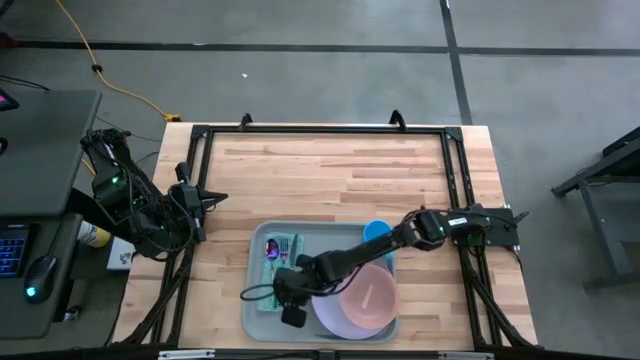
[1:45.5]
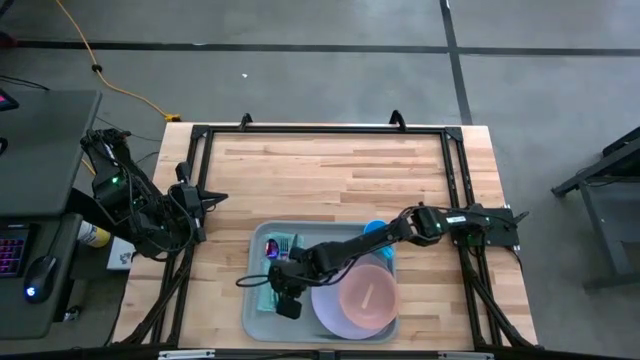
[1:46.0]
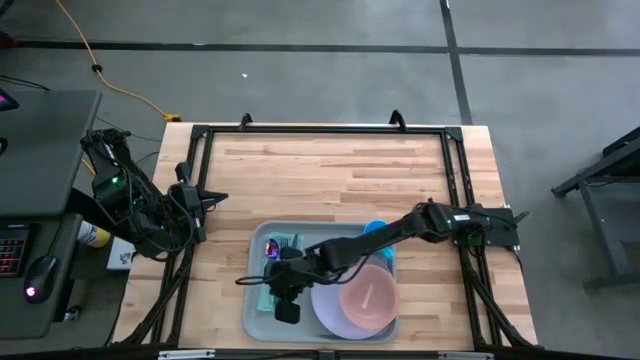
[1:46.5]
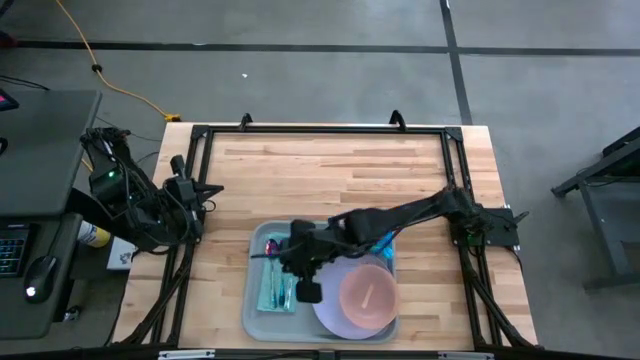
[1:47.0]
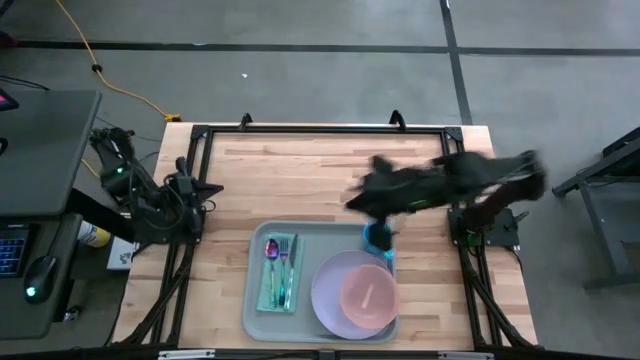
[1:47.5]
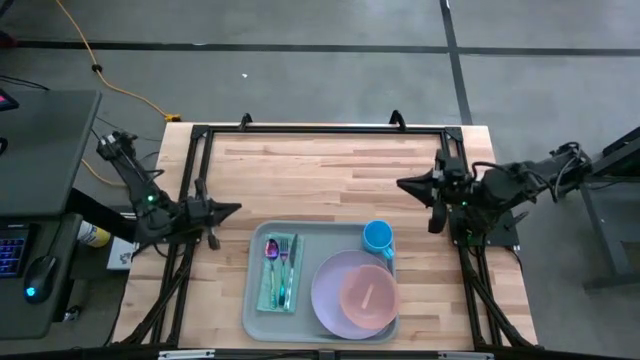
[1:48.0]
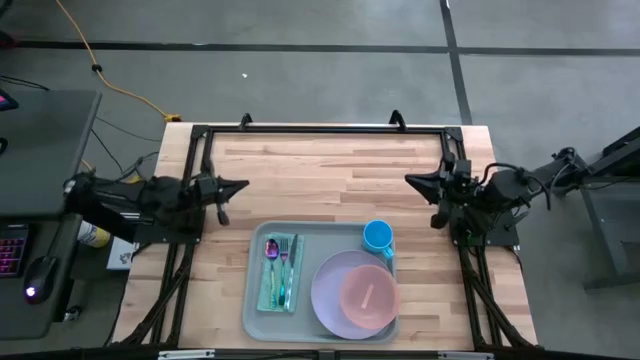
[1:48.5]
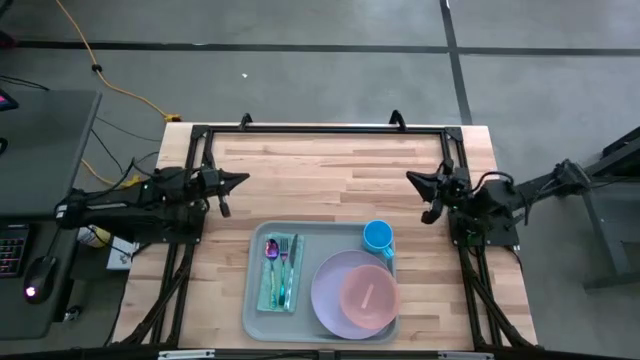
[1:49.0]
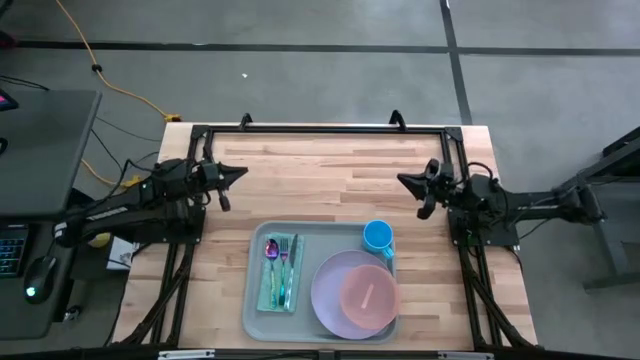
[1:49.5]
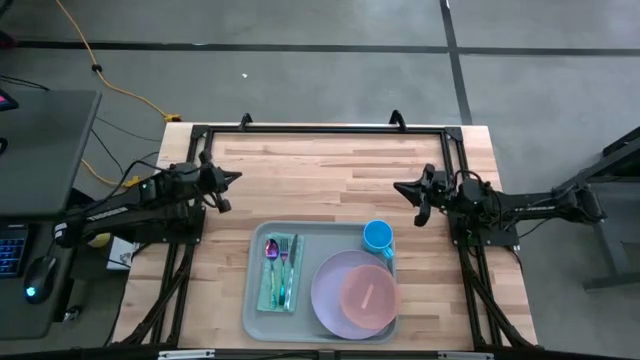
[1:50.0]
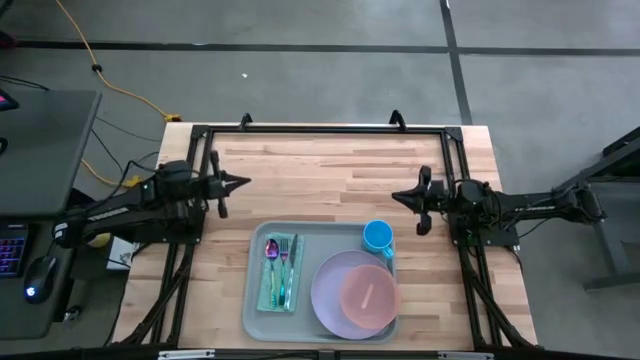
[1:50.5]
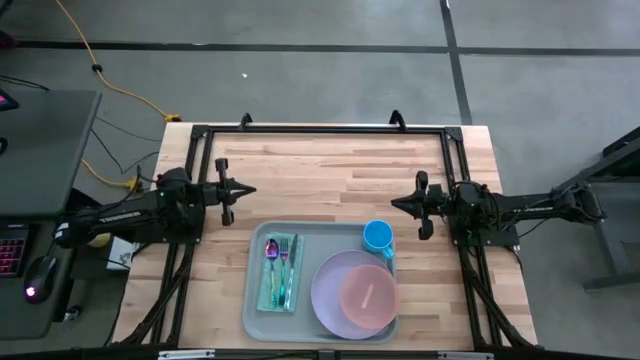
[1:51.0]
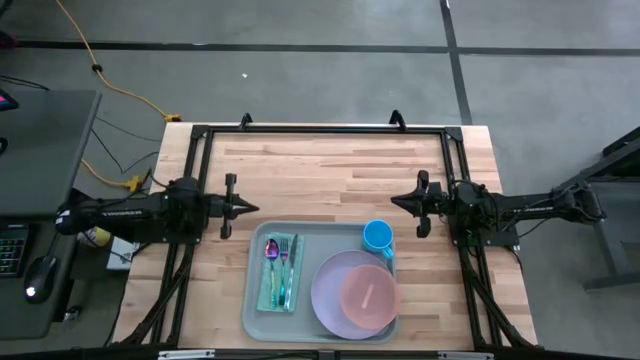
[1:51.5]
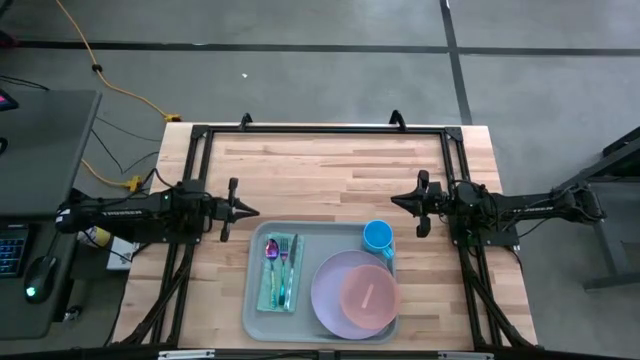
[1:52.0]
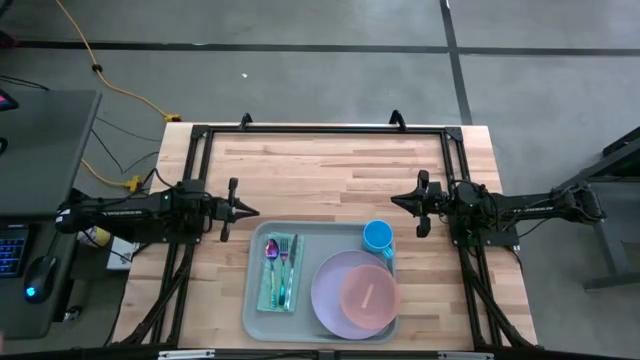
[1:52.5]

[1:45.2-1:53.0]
Task: Set up tray
Return to Home Position

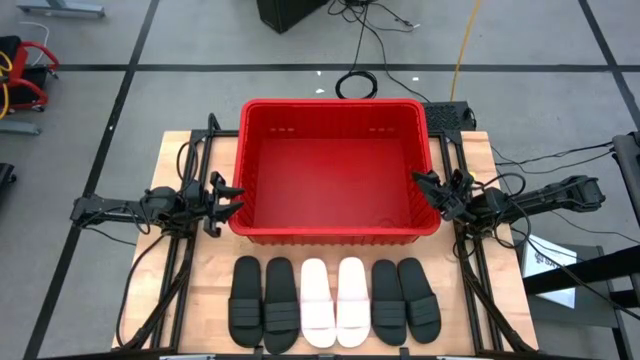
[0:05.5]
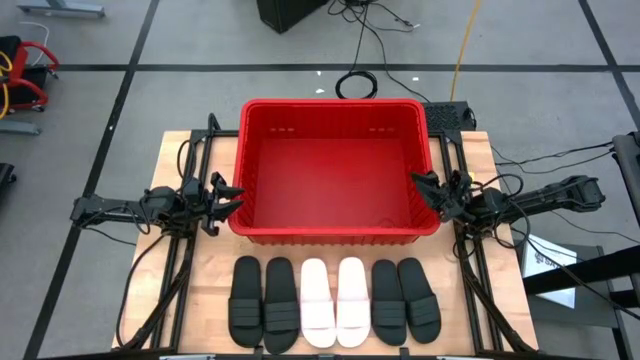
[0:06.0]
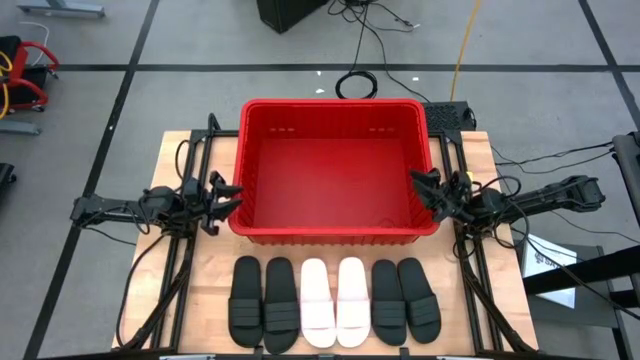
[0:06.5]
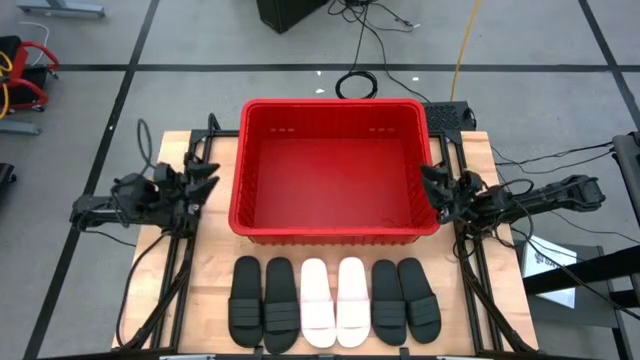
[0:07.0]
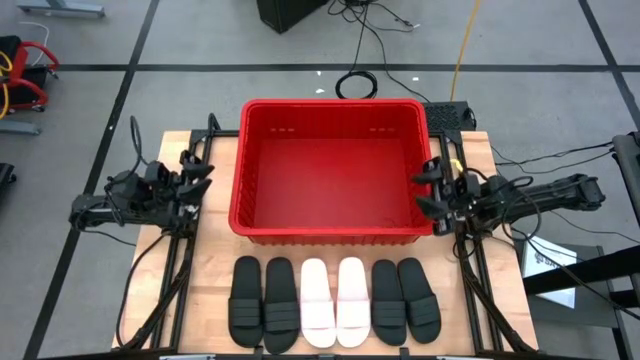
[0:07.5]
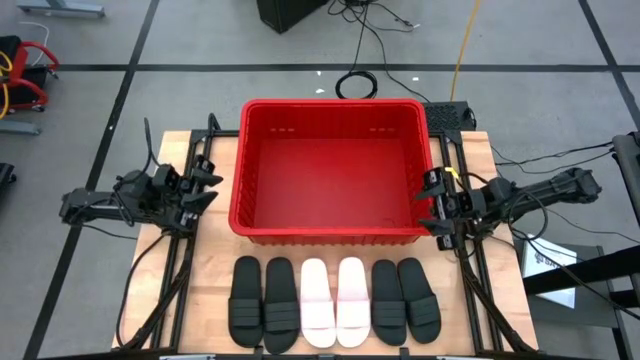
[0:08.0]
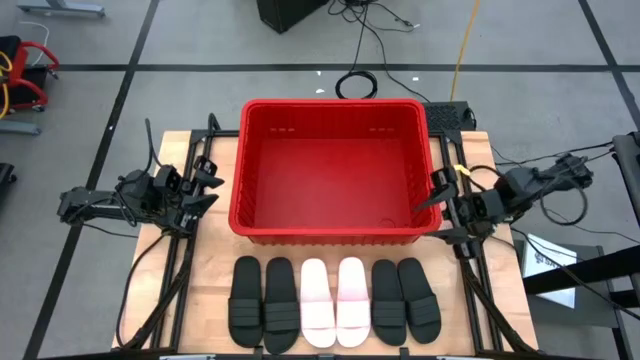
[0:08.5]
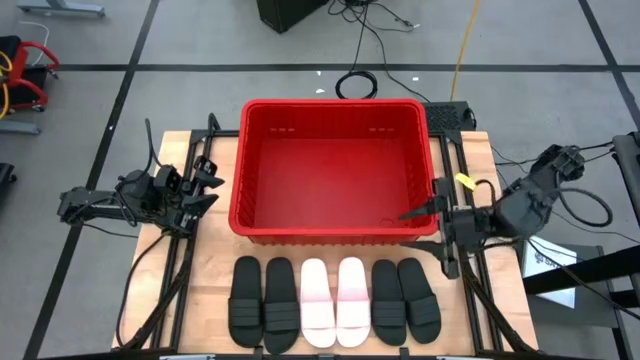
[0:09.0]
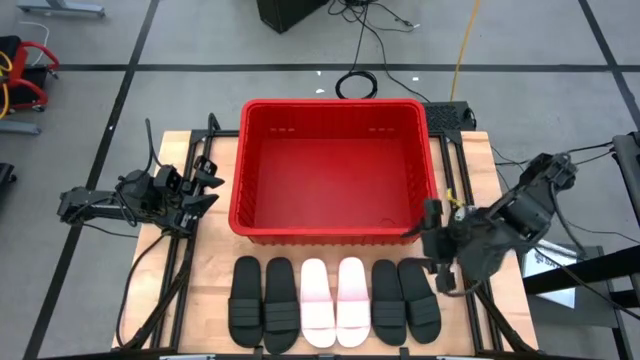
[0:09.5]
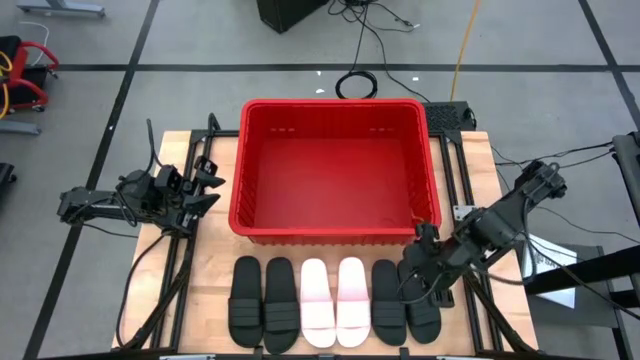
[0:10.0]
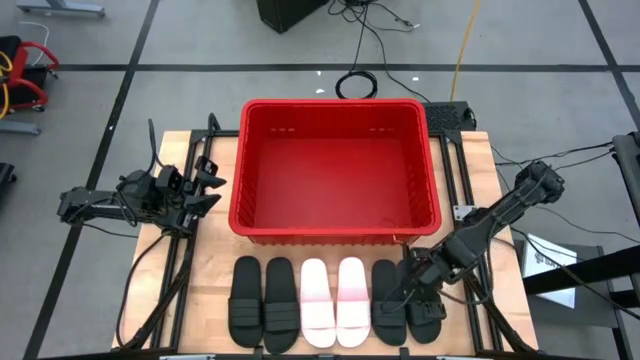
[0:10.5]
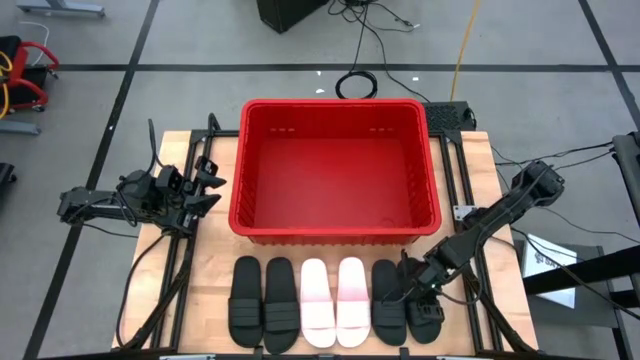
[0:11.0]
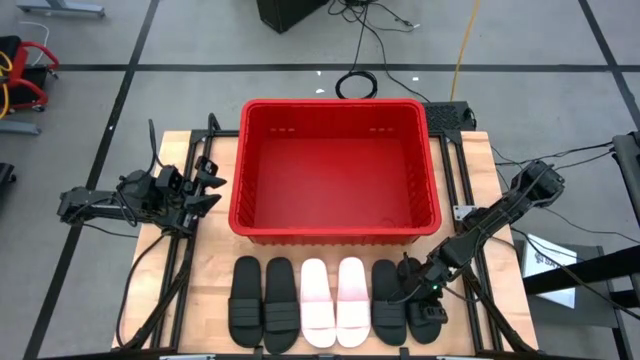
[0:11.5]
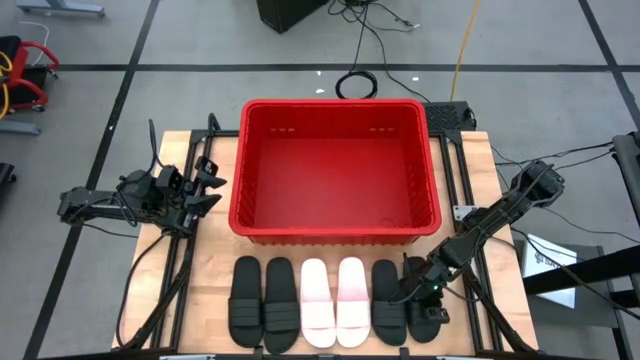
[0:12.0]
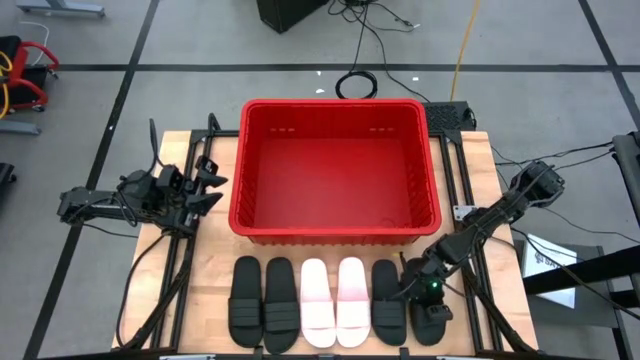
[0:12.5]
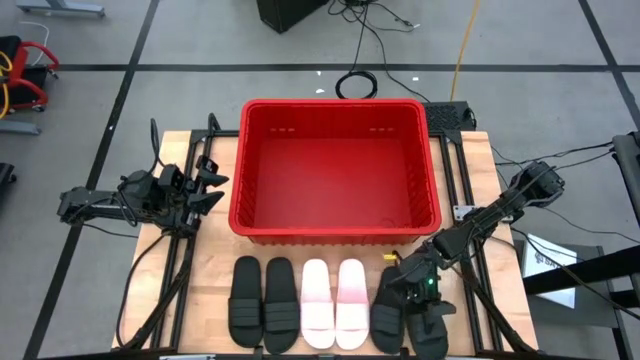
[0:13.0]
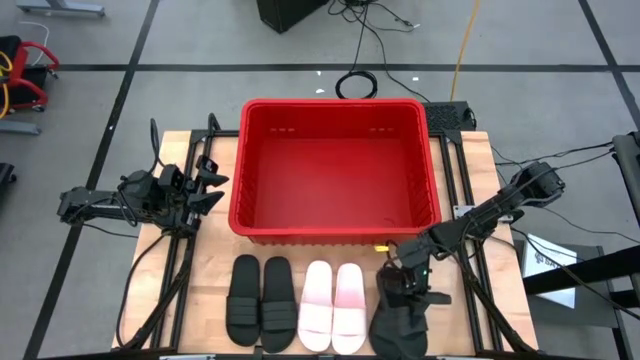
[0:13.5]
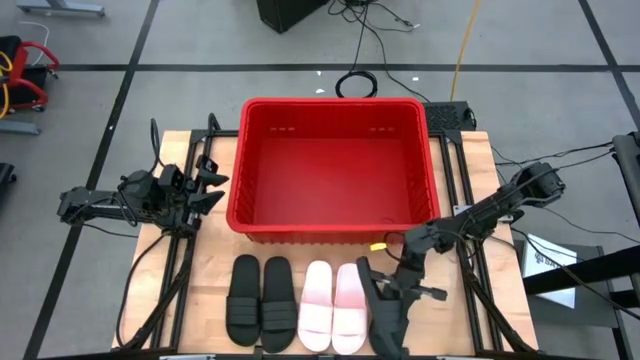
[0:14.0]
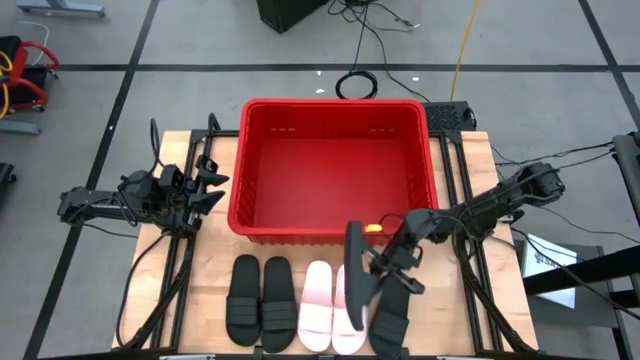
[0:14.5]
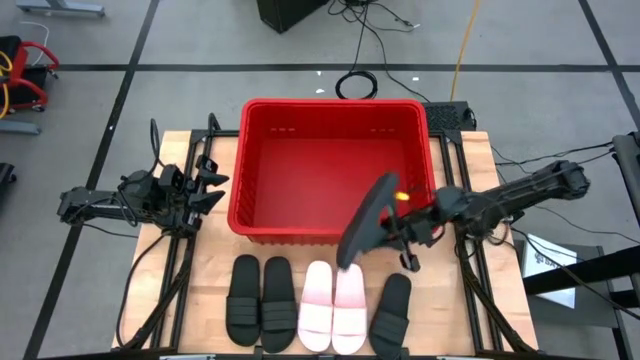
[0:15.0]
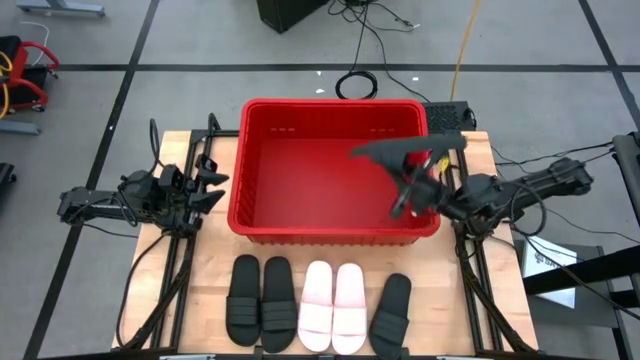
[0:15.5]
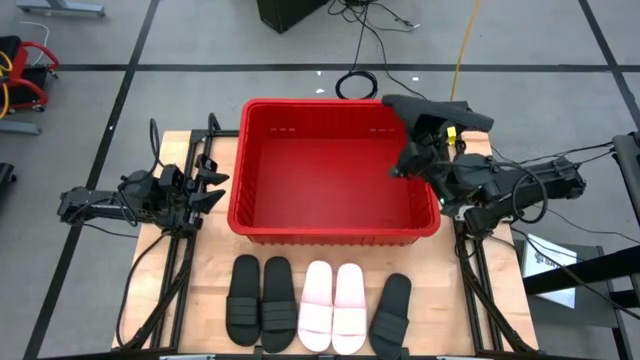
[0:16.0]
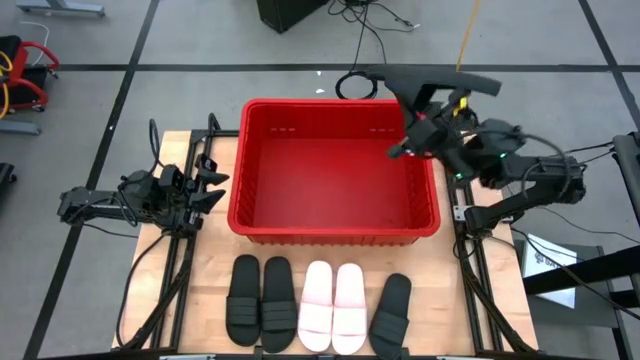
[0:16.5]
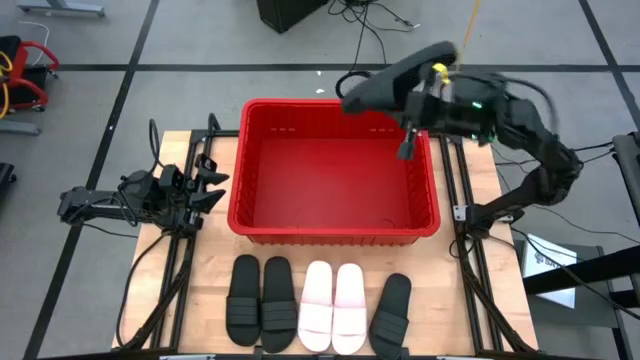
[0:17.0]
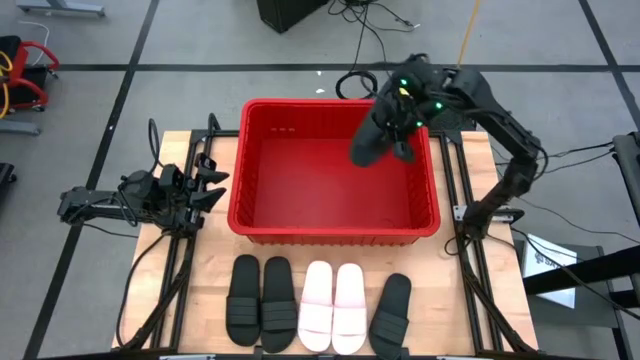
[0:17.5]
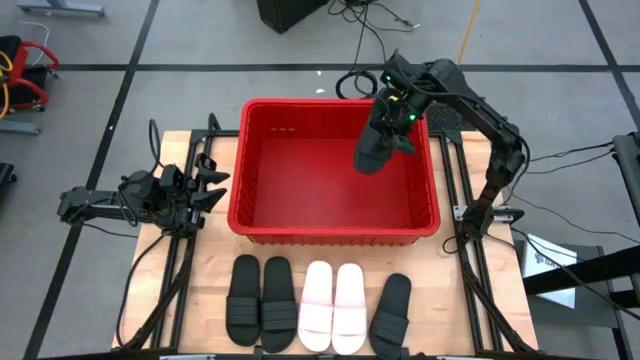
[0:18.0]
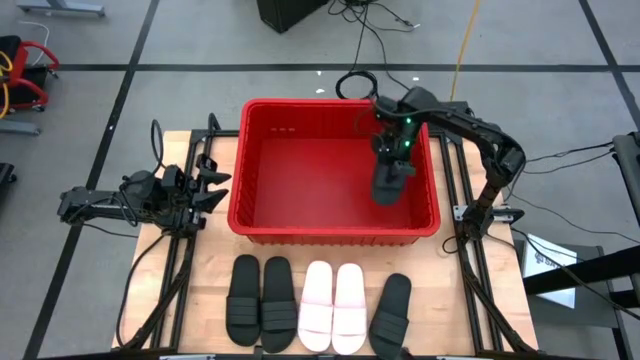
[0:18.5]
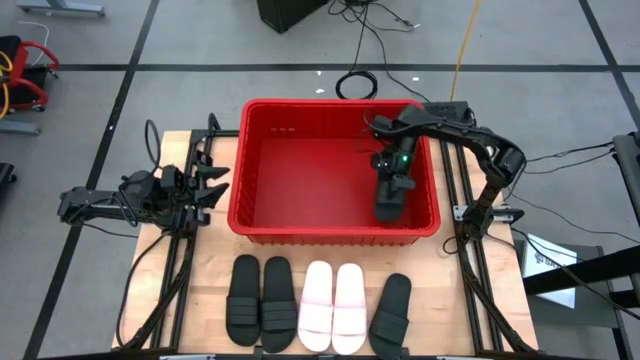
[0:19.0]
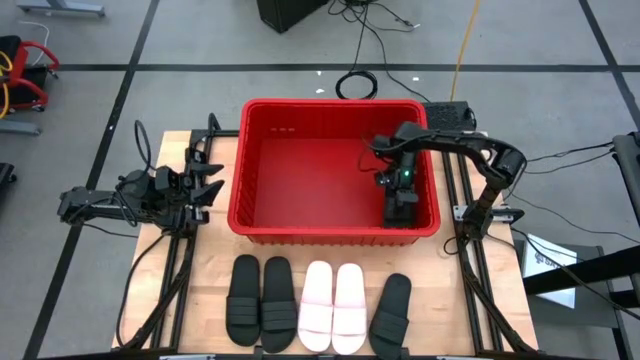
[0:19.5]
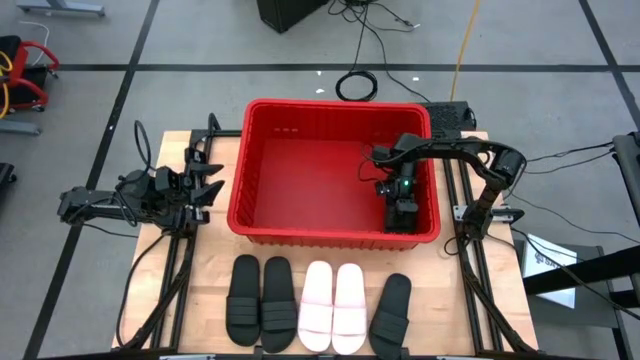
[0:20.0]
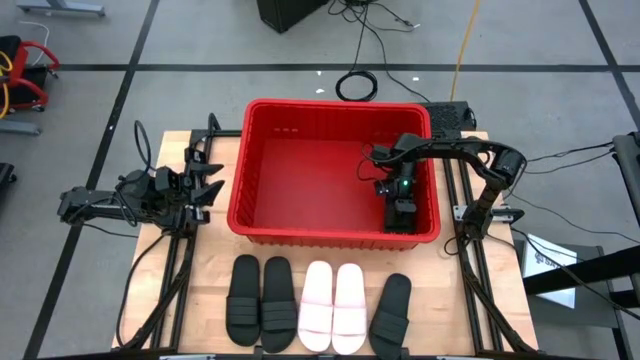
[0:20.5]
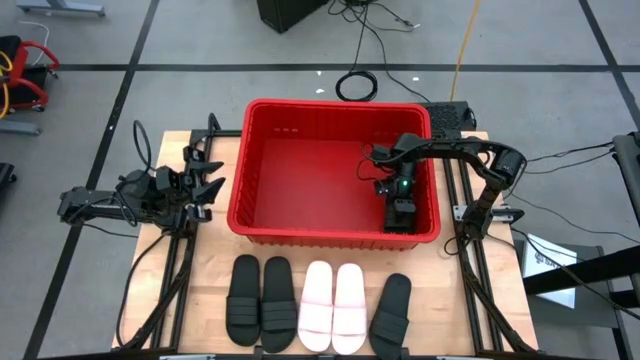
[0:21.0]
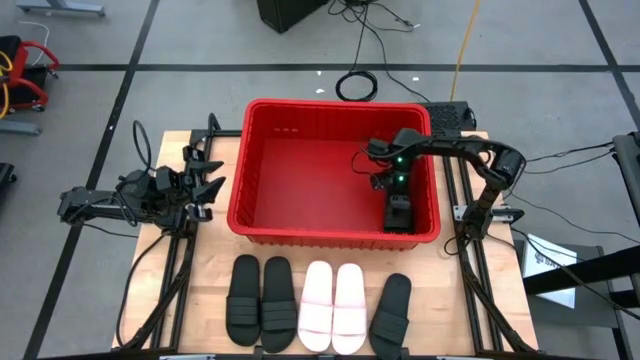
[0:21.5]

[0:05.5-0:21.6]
Task: Pick and place slides into bin
Put the black slide into the red bin
